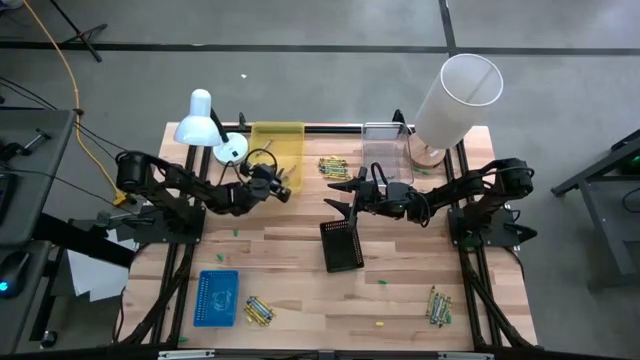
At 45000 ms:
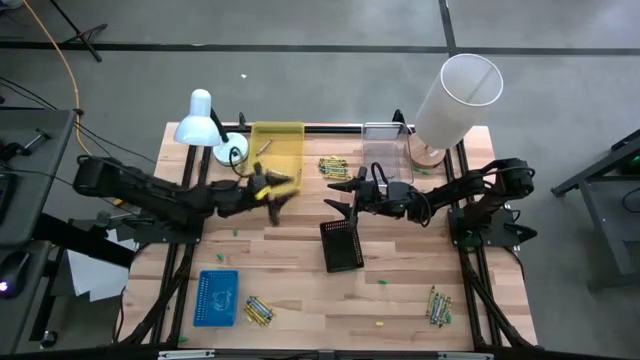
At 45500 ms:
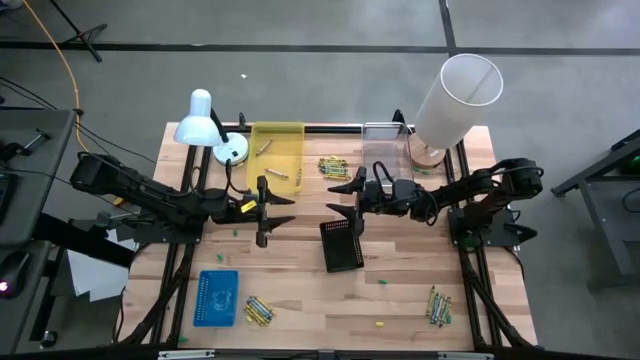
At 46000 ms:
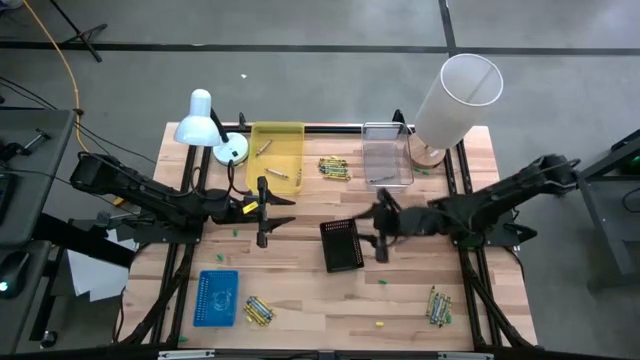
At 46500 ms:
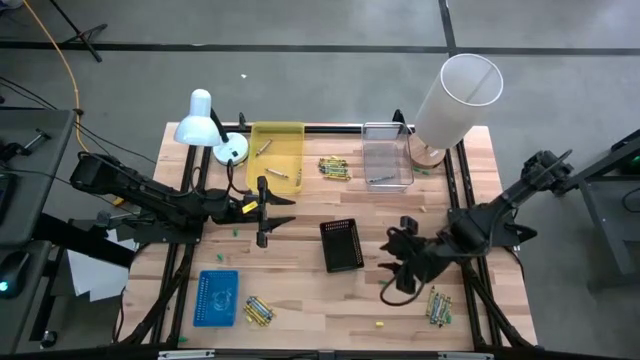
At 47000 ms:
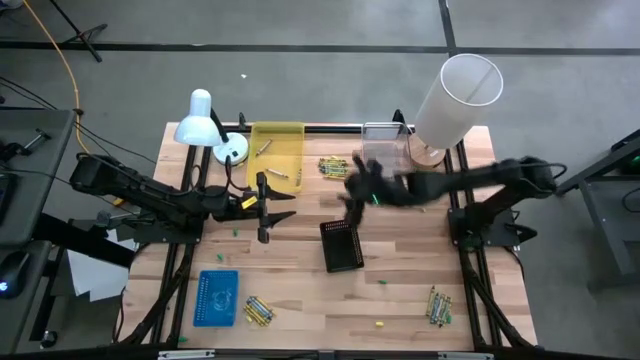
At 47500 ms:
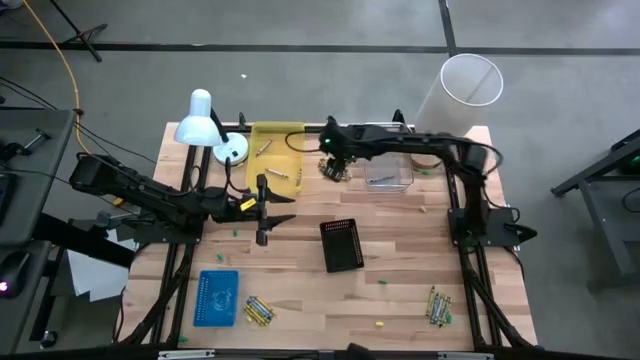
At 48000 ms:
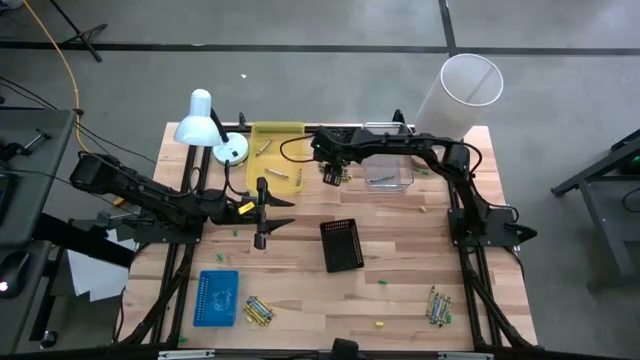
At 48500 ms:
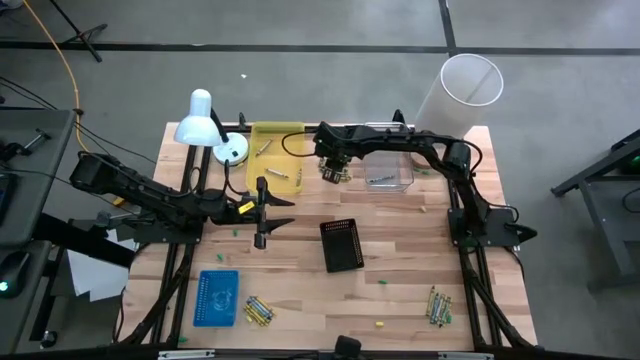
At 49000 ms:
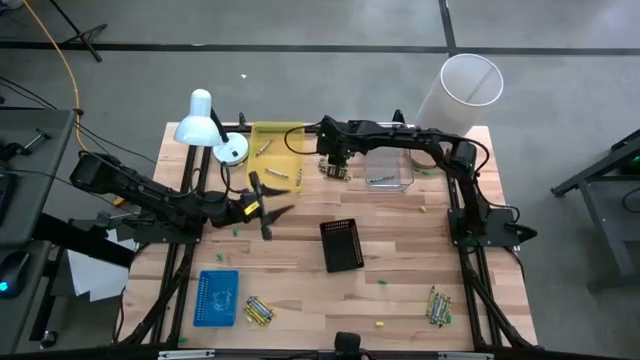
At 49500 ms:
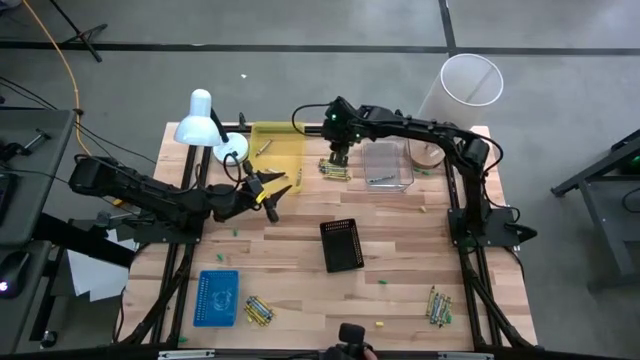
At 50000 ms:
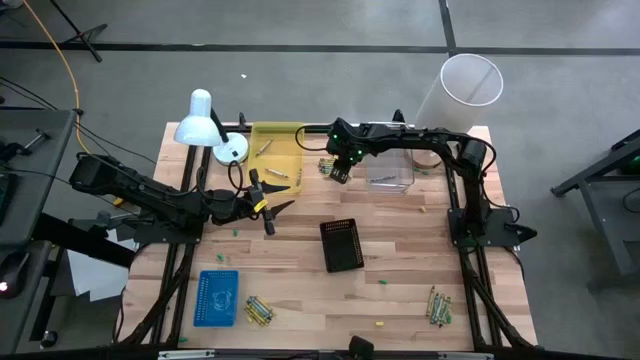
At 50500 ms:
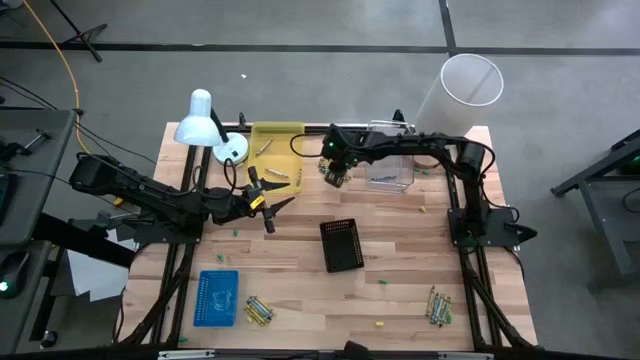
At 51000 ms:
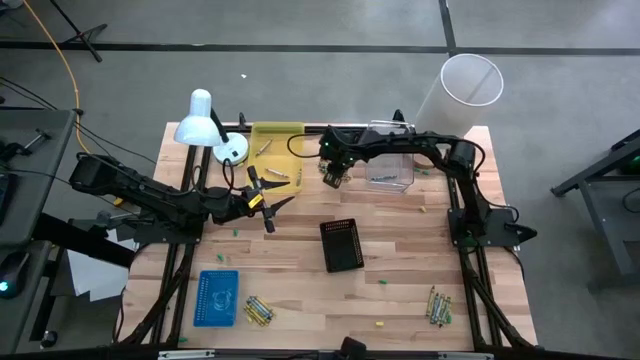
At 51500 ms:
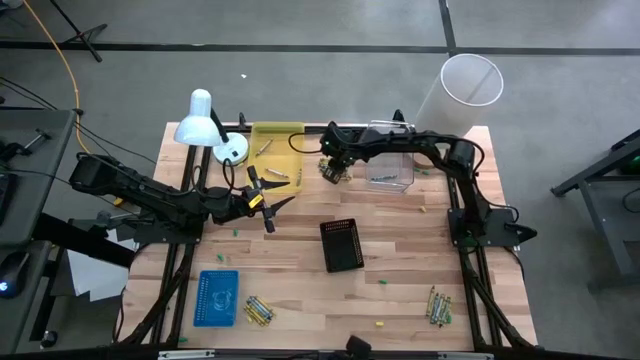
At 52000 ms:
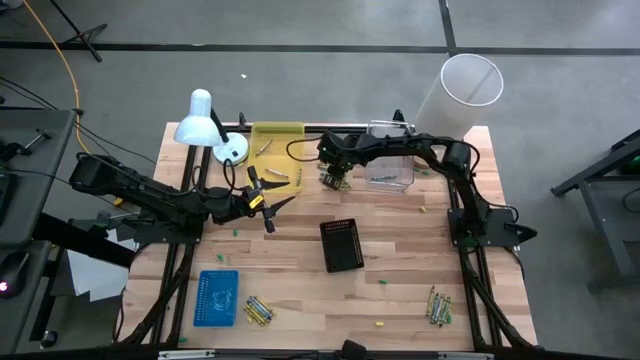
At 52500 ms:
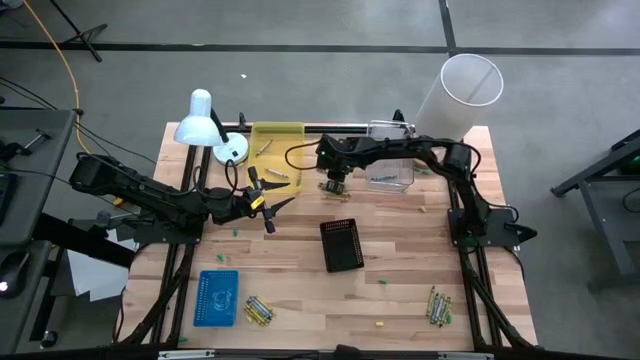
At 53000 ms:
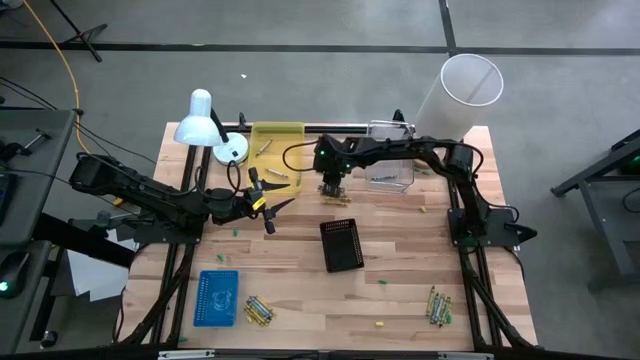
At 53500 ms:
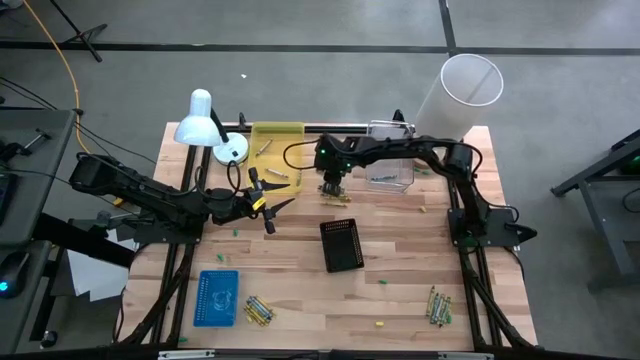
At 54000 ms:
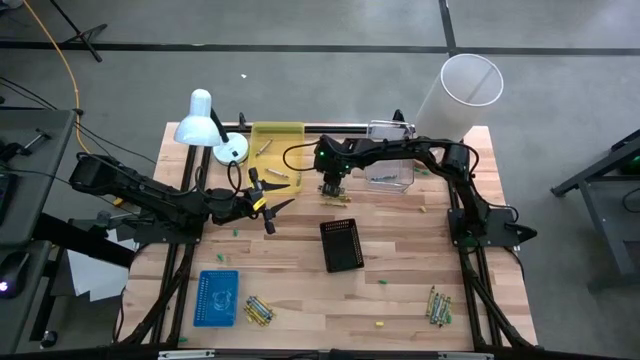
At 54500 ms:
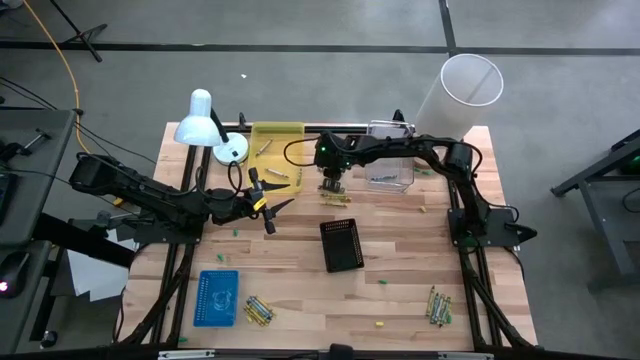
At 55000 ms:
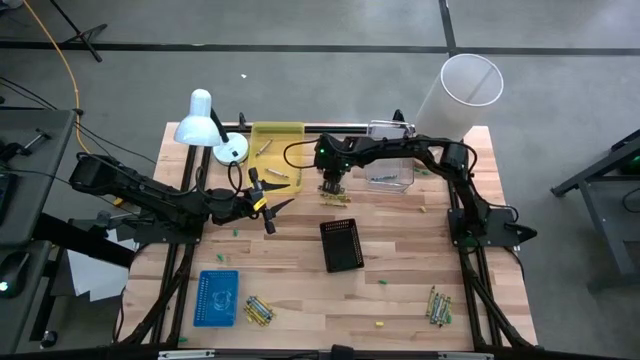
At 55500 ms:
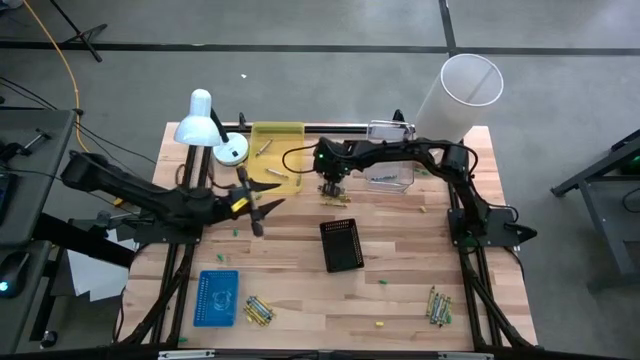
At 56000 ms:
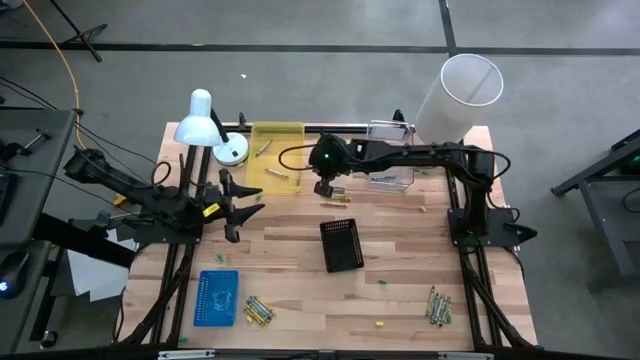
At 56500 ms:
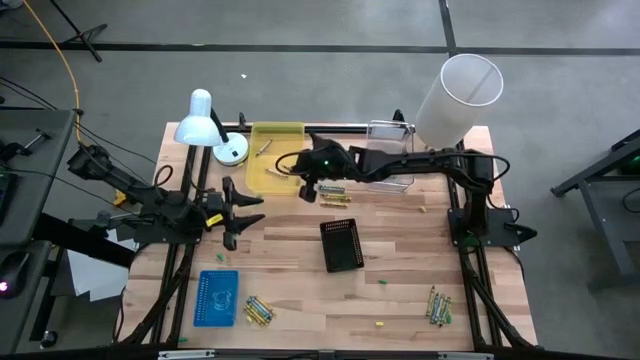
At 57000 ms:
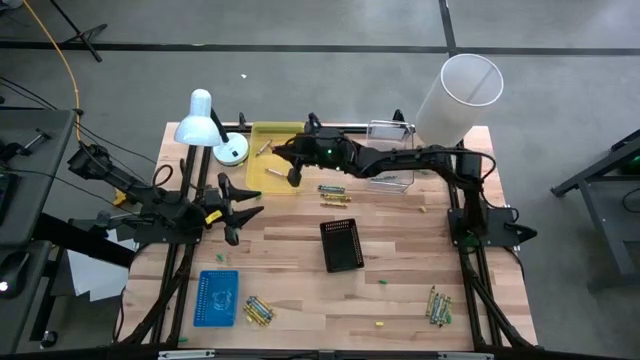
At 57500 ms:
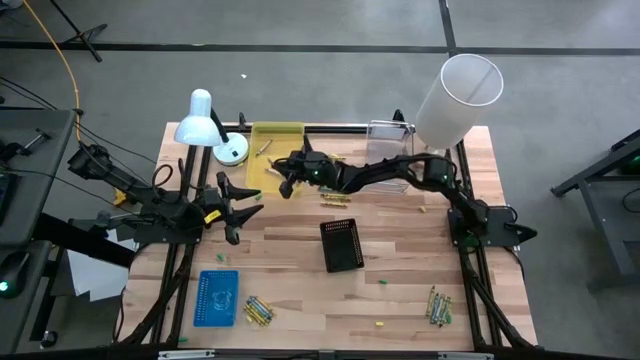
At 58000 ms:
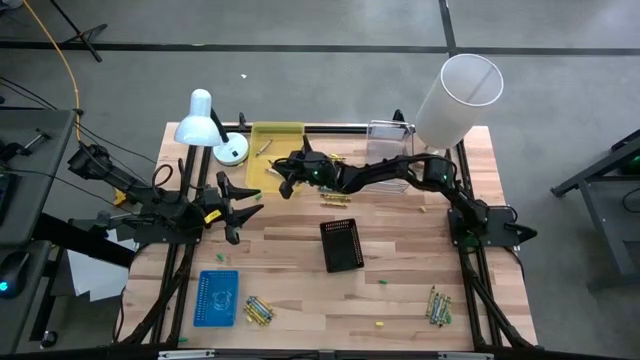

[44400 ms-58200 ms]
Task: Sort crayons
Put the gray crayon into the yellow transparent bin

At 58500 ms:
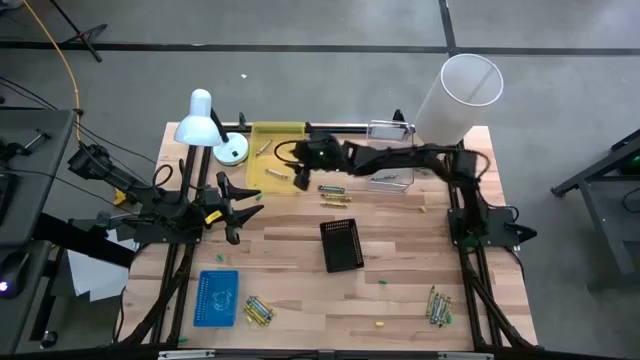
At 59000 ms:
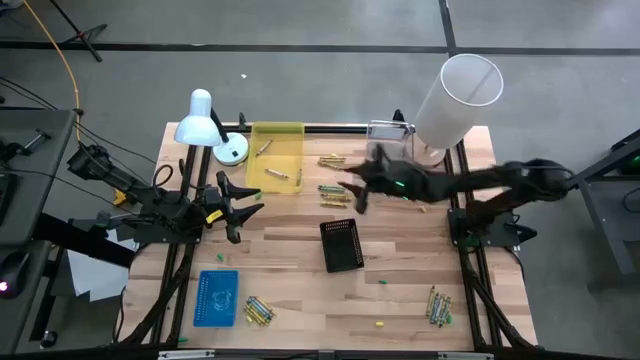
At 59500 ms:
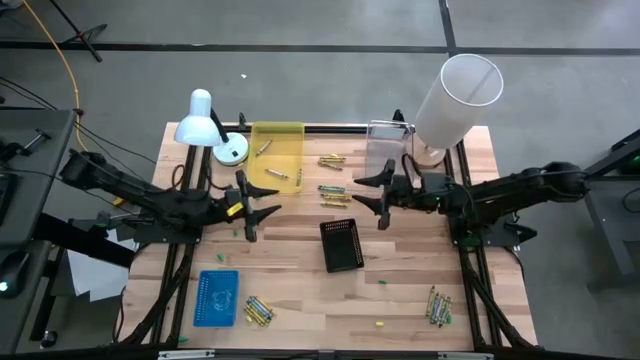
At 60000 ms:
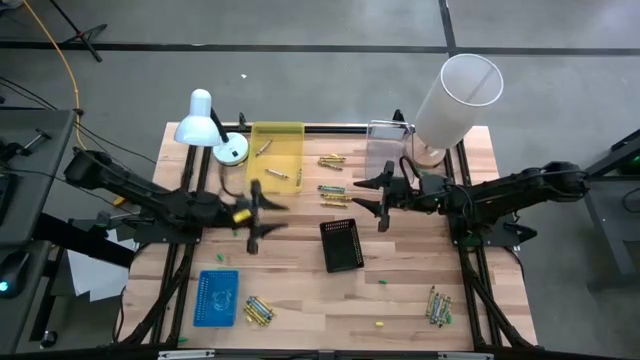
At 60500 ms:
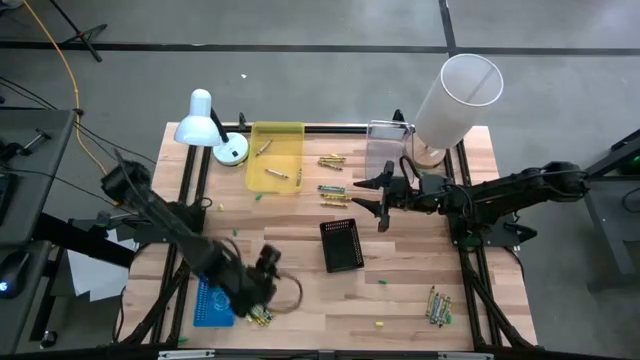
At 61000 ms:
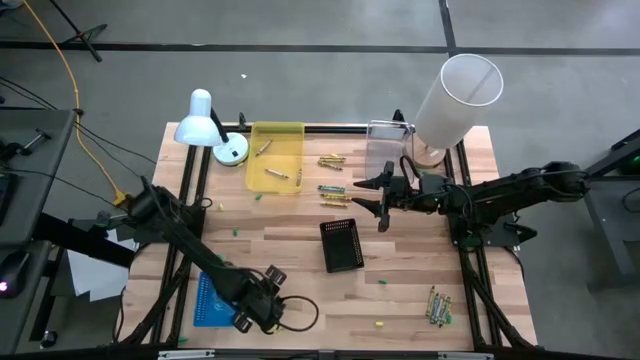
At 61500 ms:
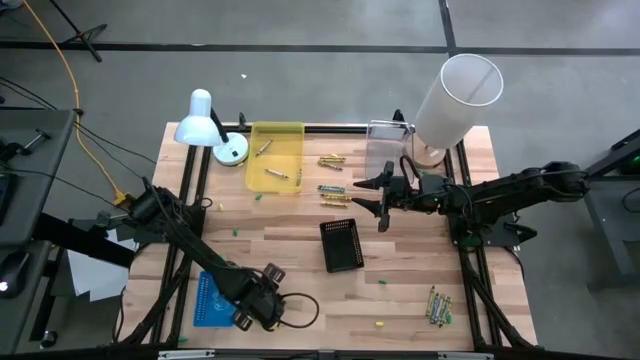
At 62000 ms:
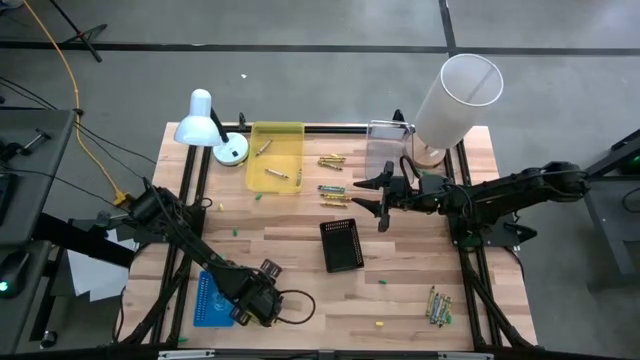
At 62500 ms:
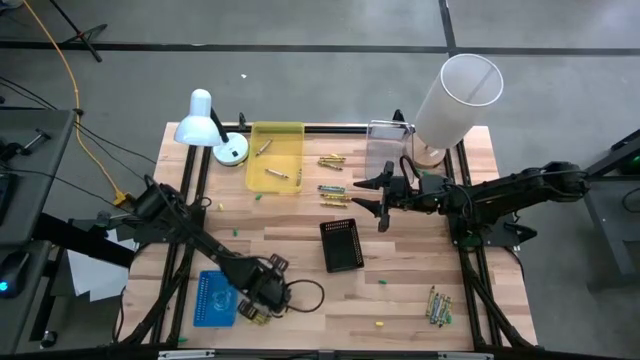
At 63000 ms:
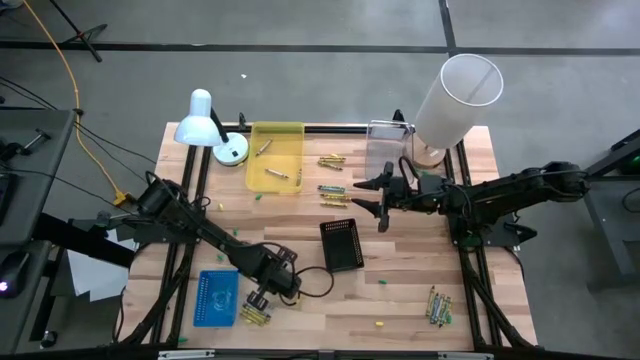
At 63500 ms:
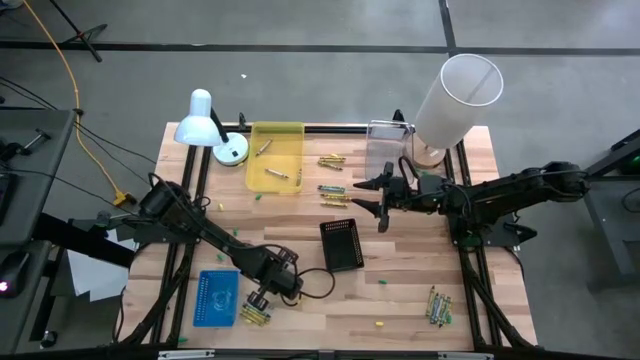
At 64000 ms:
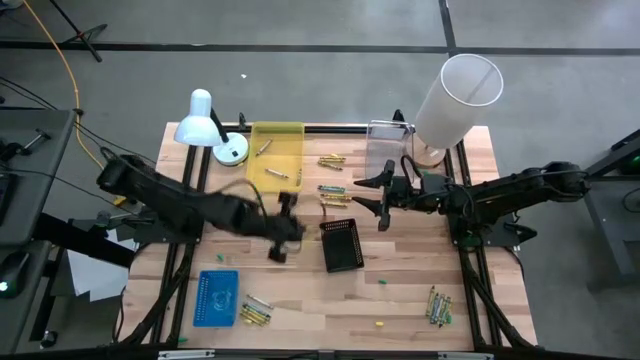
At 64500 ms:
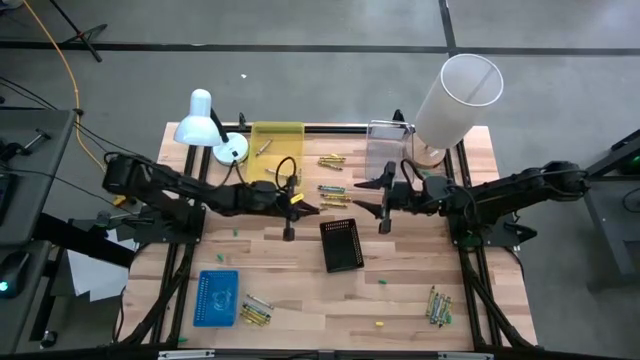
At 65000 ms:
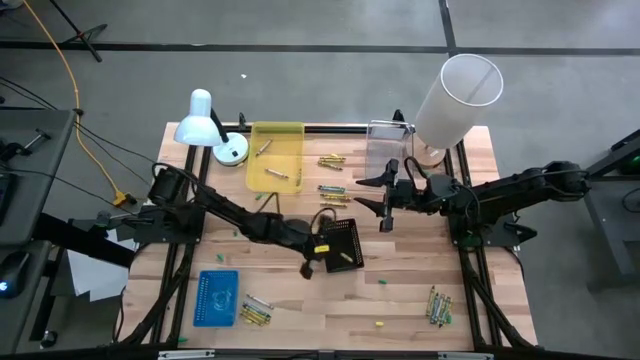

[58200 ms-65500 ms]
Put the yellow crayon into the black bin

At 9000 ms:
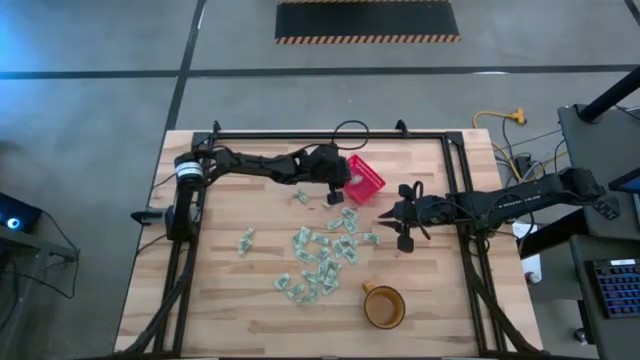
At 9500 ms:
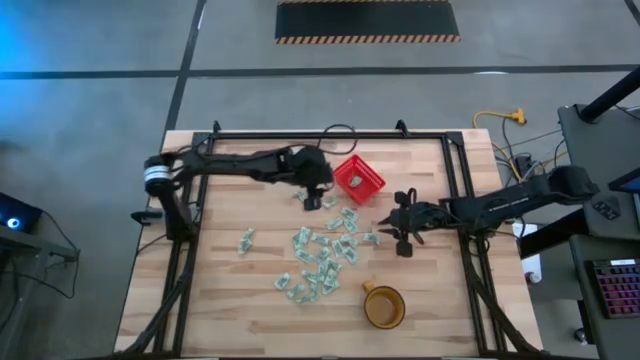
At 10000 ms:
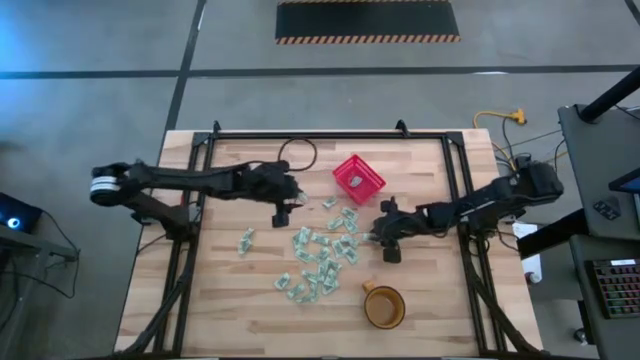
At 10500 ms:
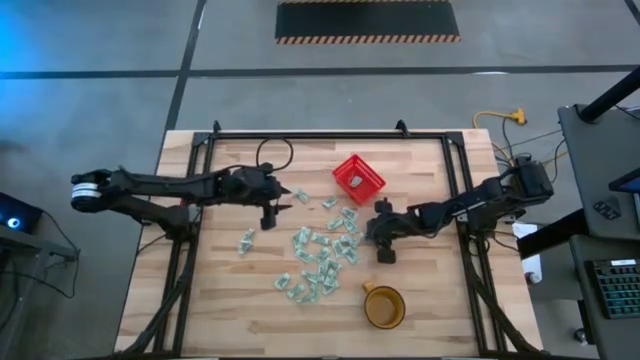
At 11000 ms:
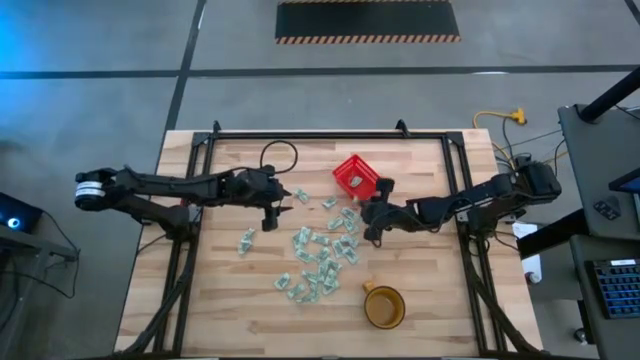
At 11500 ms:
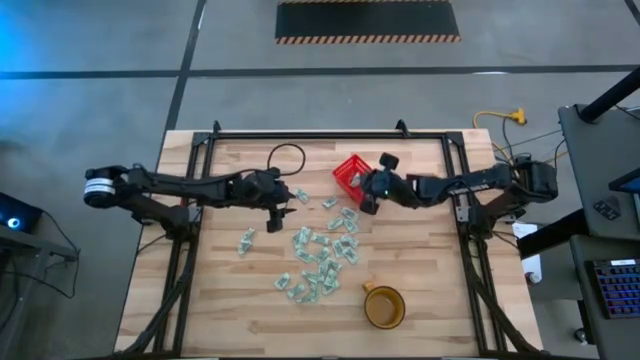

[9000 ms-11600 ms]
Task: Pick and place Stevia / Truvia into bins
Put the stevia packet into the red basket
